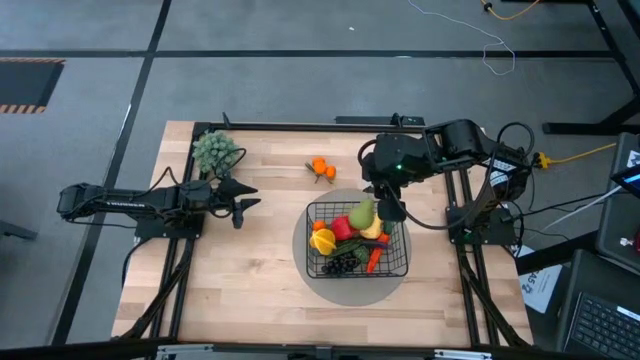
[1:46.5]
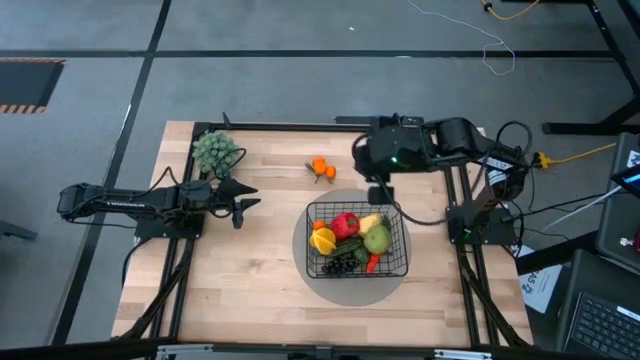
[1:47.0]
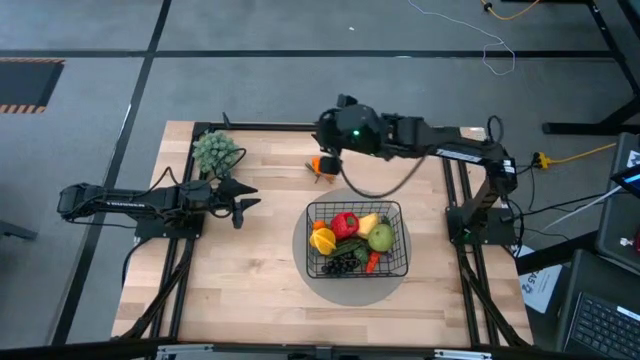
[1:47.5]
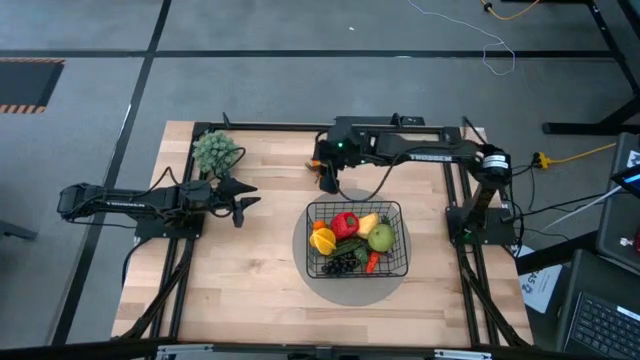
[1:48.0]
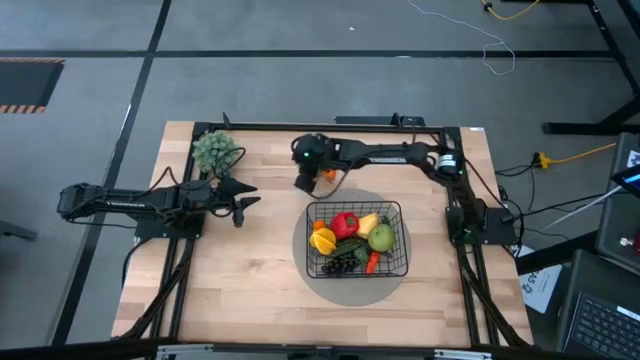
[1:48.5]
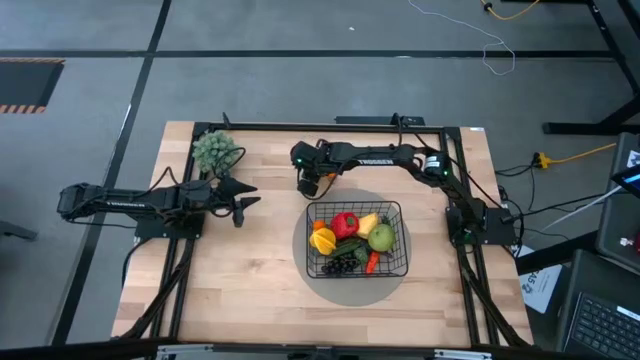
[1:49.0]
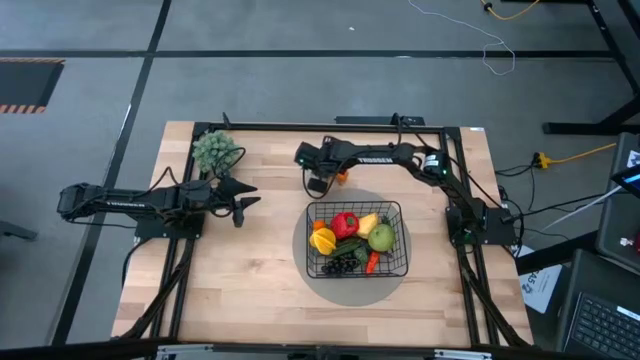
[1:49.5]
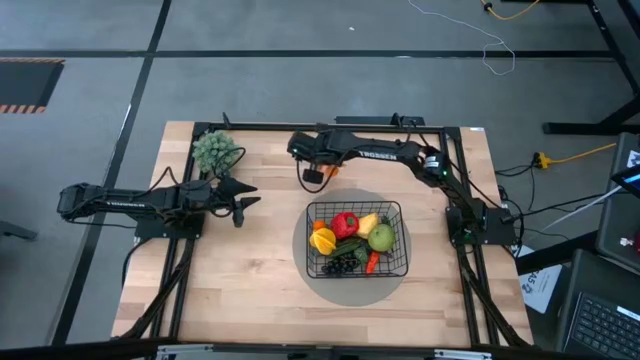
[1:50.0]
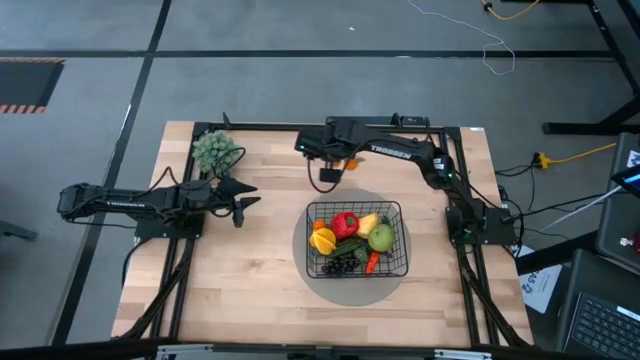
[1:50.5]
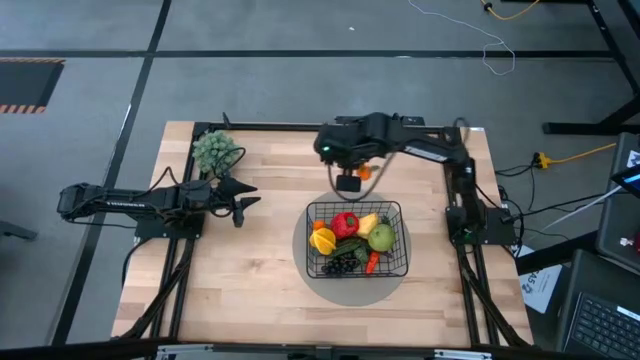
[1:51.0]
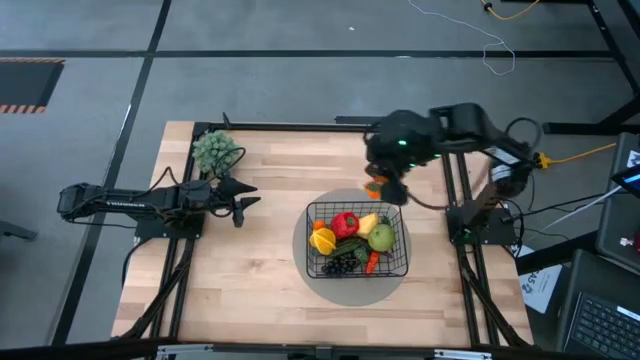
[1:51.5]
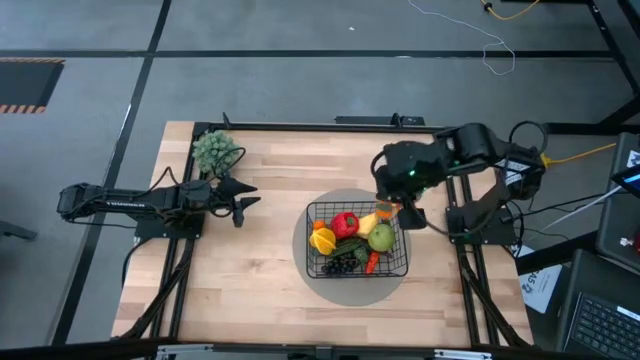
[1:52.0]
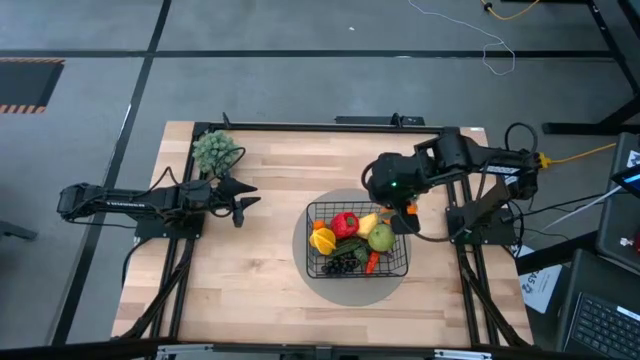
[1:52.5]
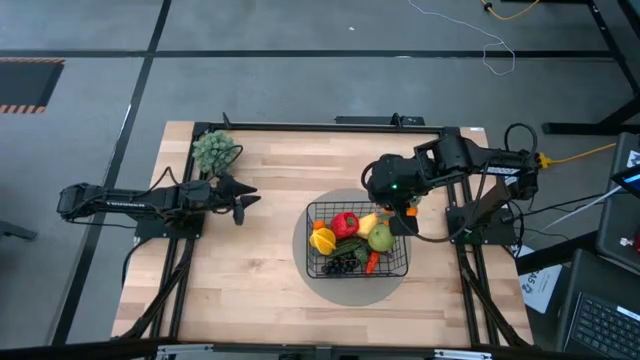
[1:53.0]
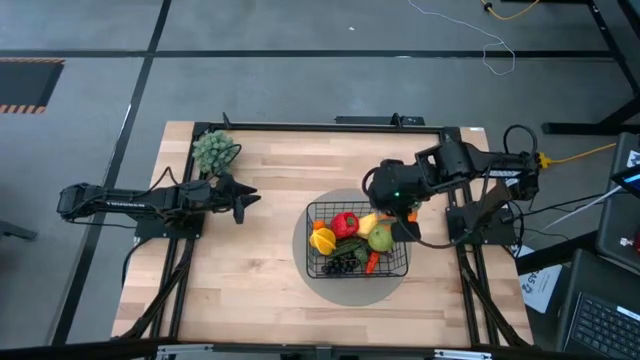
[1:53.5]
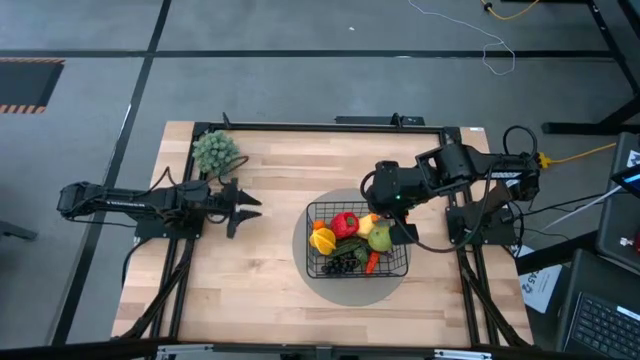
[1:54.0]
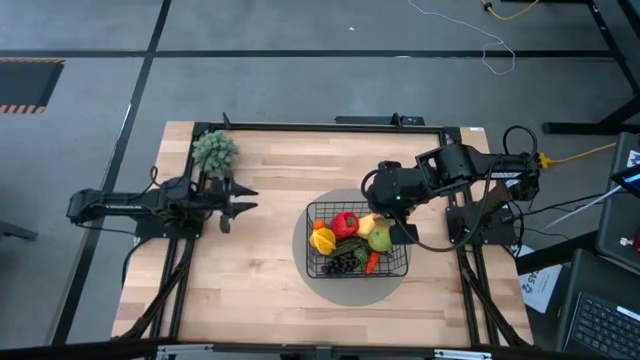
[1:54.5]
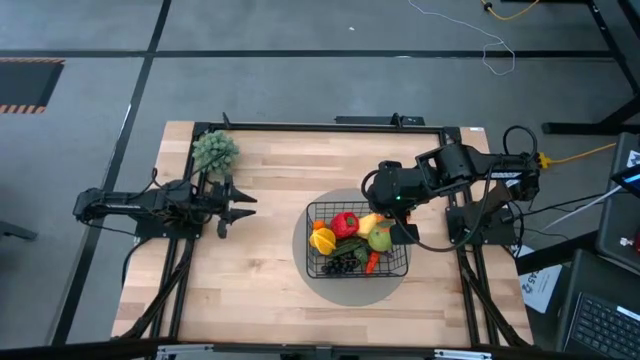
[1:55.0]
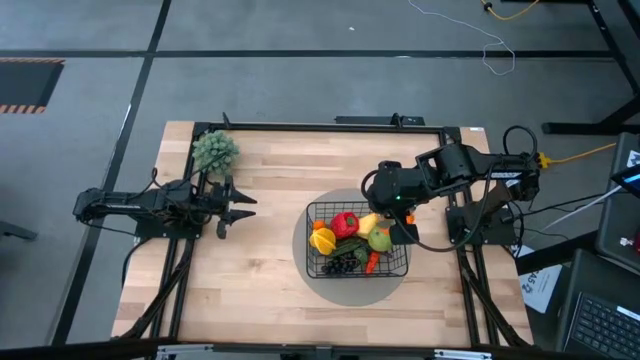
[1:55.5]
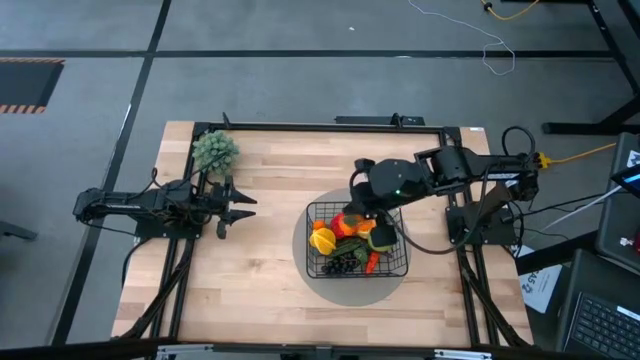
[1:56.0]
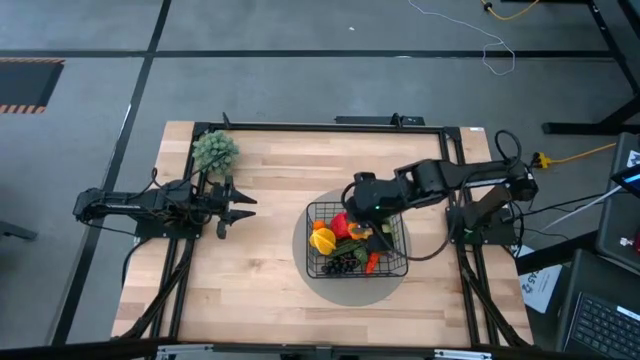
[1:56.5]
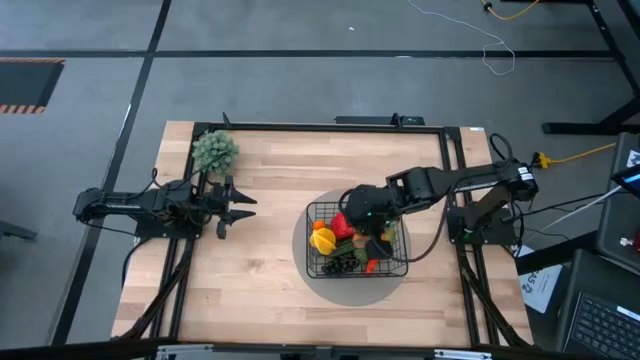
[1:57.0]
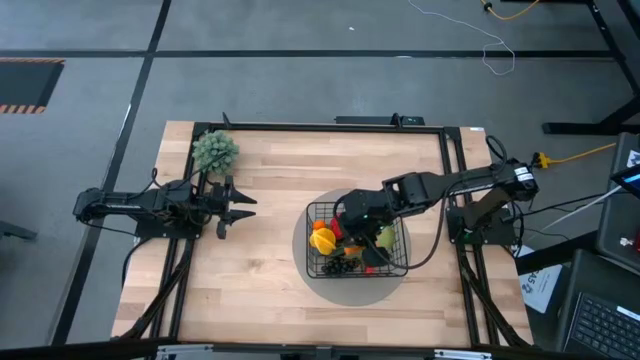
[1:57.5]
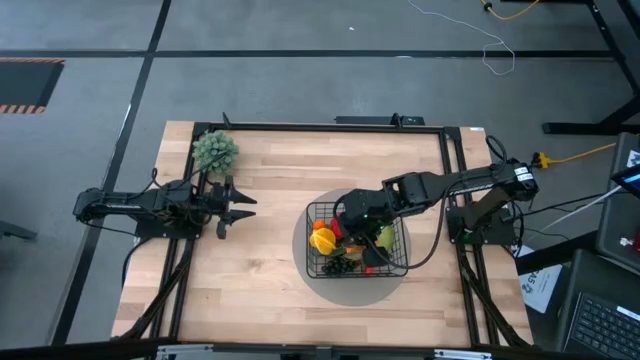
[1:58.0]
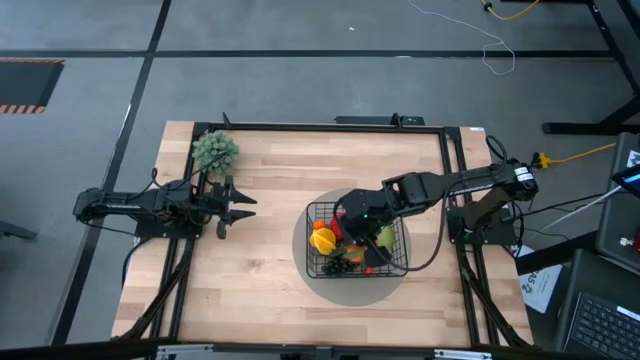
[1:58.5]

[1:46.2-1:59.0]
Task: Build produce basket
Put the orange tangerine into the black wire basket

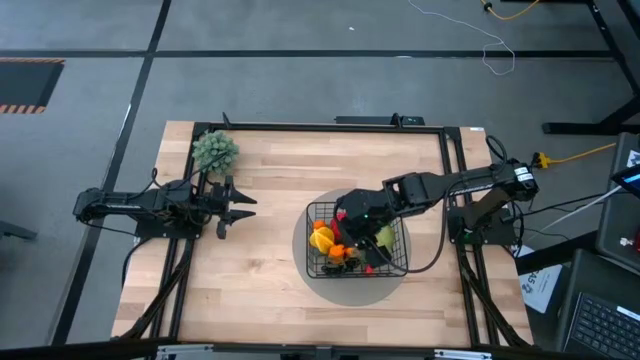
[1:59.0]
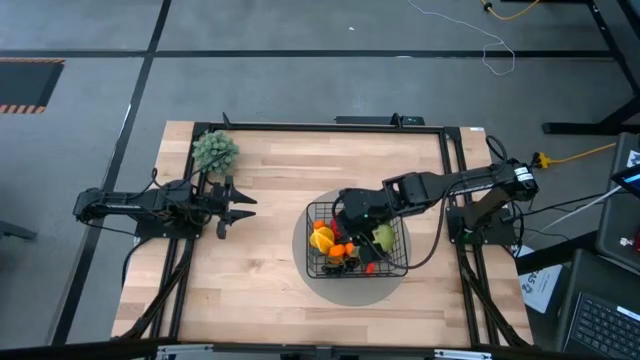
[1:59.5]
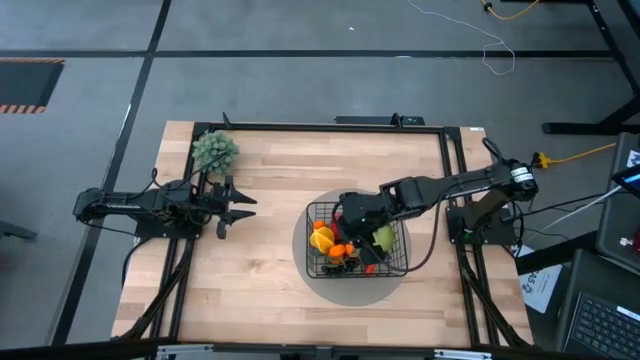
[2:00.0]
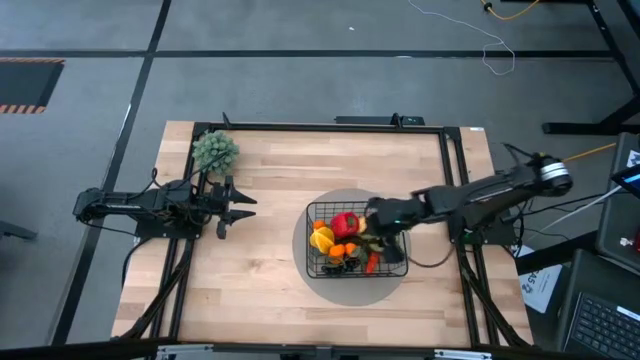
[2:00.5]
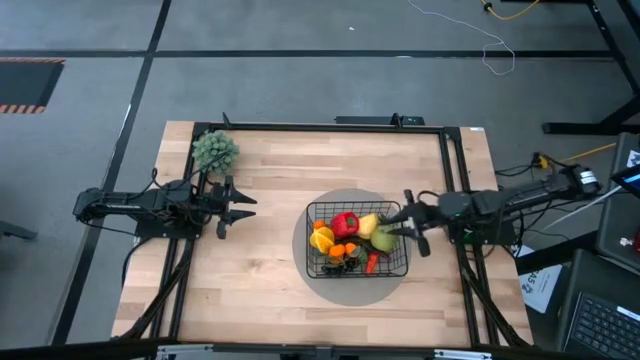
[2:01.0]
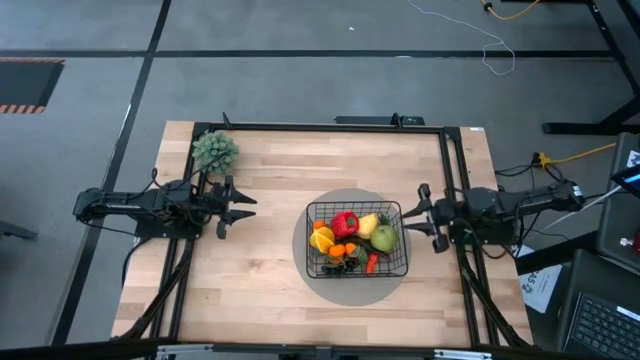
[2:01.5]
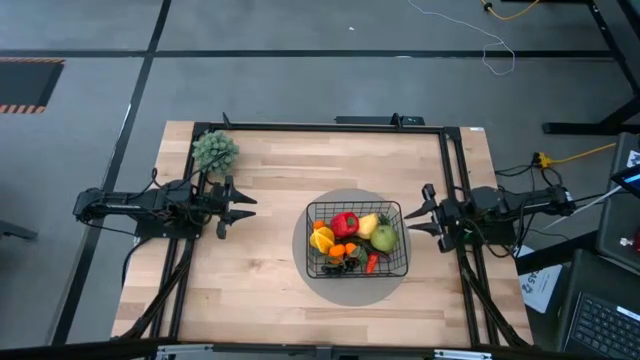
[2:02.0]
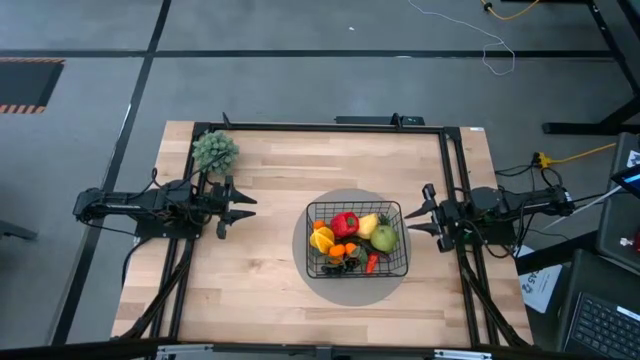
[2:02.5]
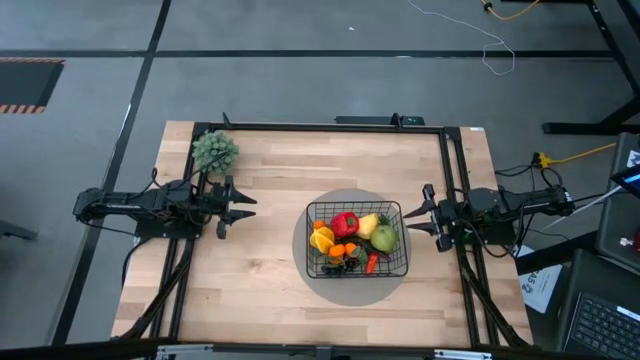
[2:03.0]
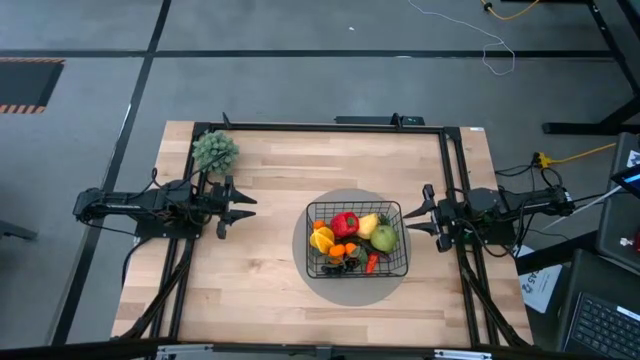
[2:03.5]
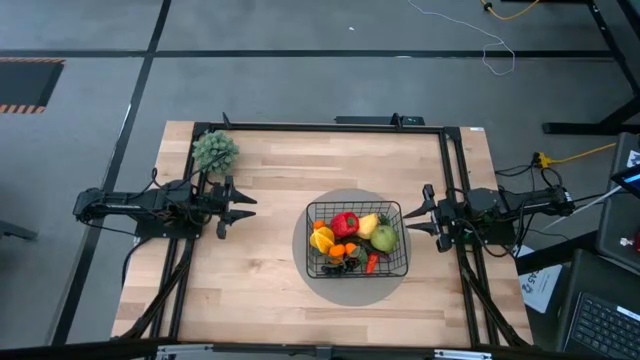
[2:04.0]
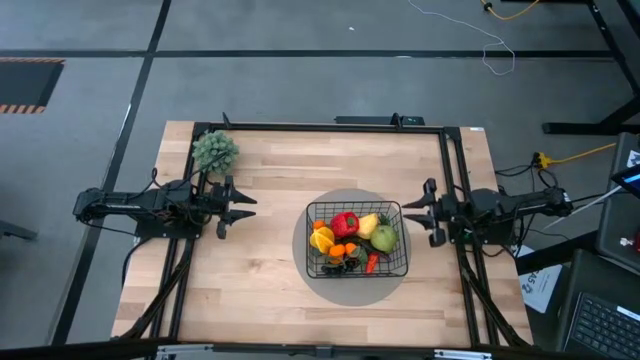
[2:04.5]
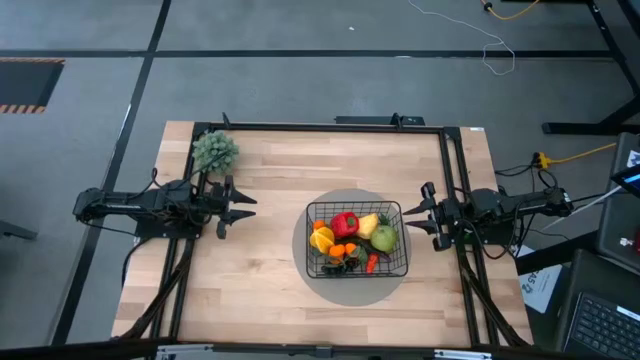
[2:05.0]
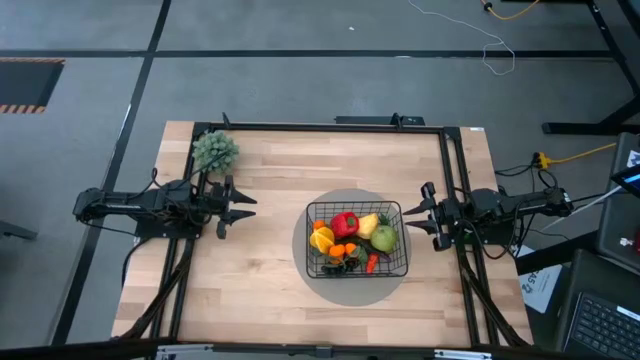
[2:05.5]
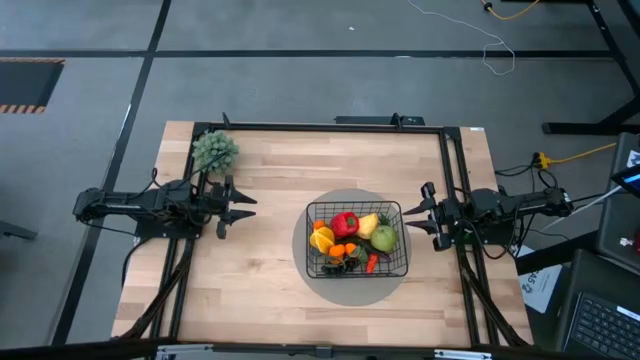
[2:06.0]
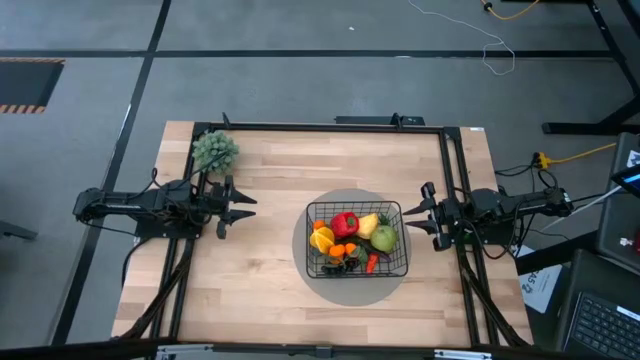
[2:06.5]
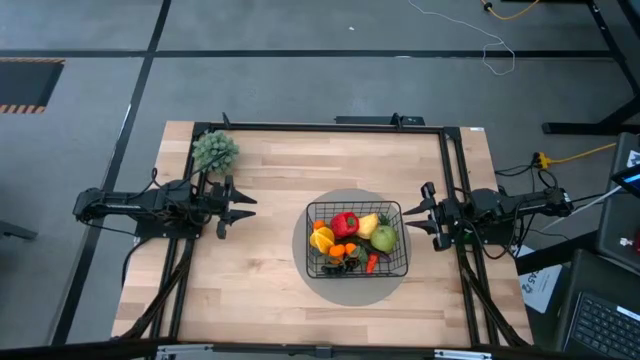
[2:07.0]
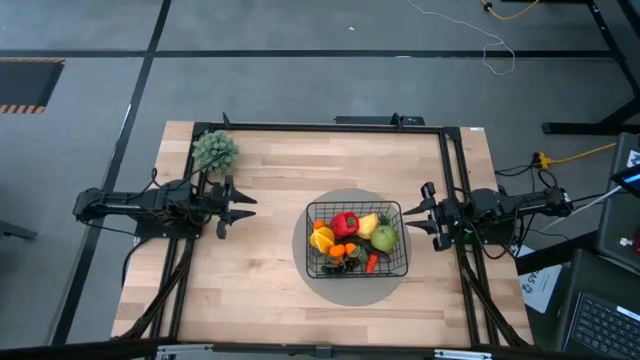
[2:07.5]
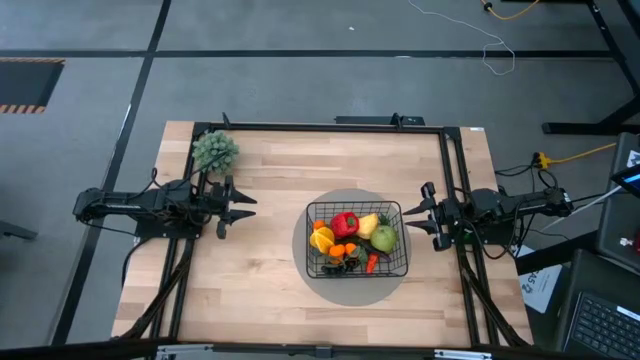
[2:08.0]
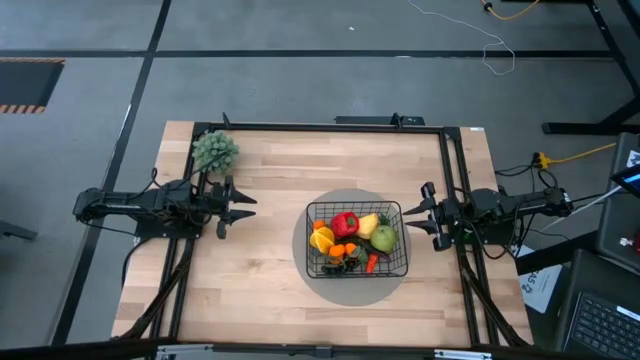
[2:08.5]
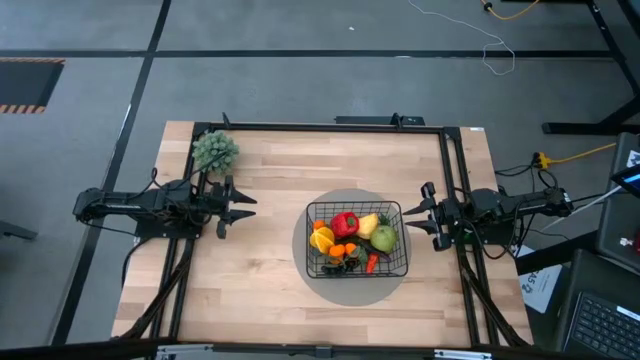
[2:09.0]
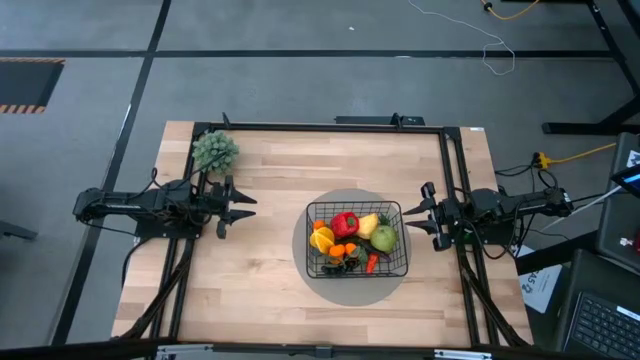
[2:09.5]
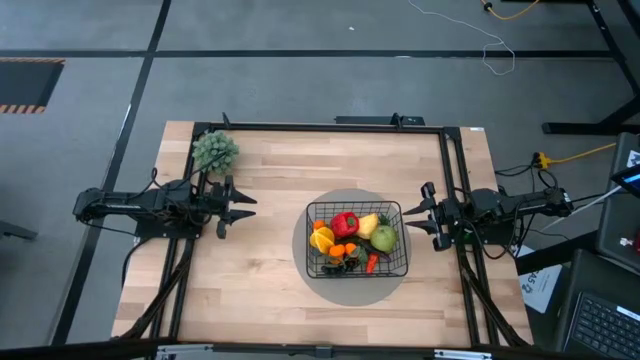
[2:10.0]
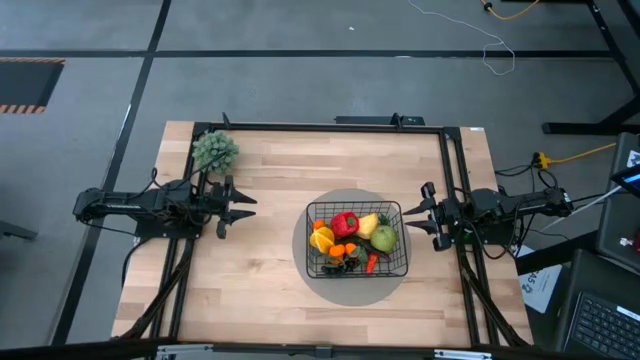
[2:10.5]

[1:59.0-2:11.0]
Return to Home Position
